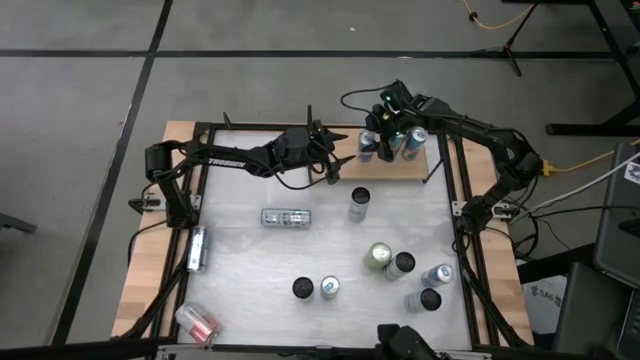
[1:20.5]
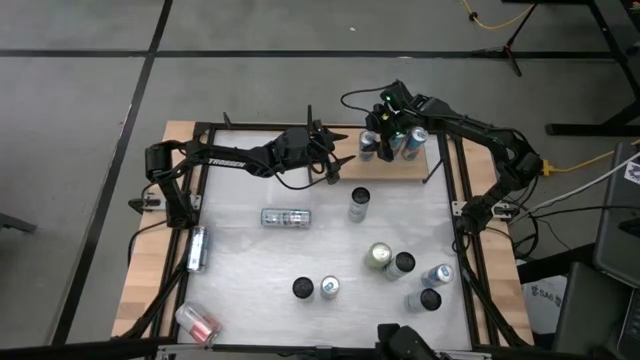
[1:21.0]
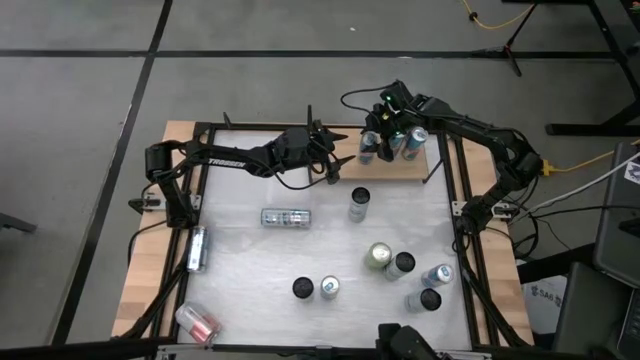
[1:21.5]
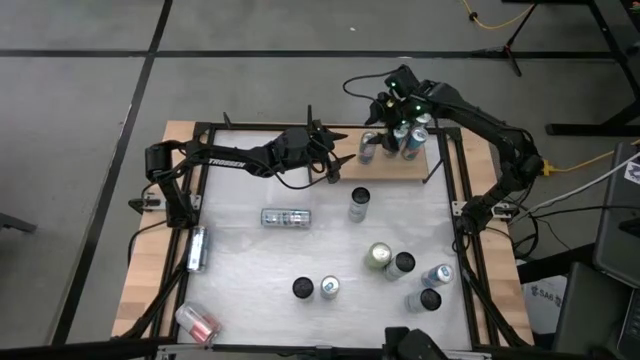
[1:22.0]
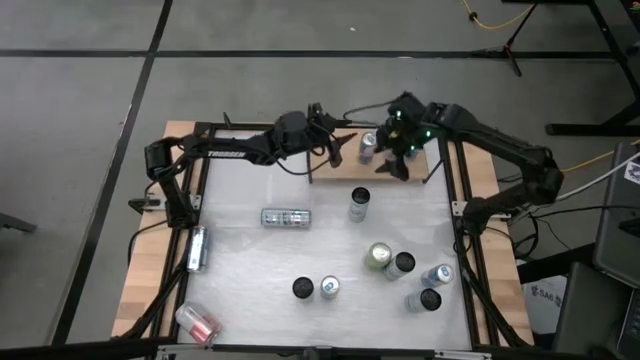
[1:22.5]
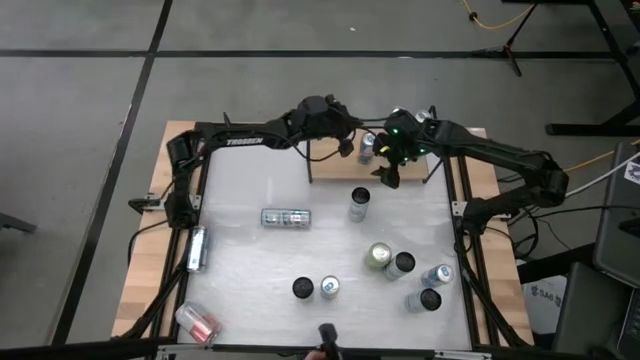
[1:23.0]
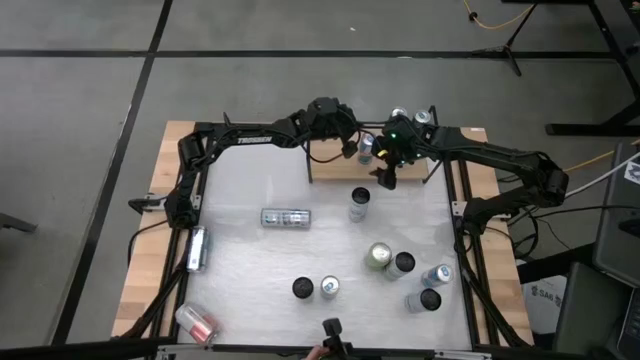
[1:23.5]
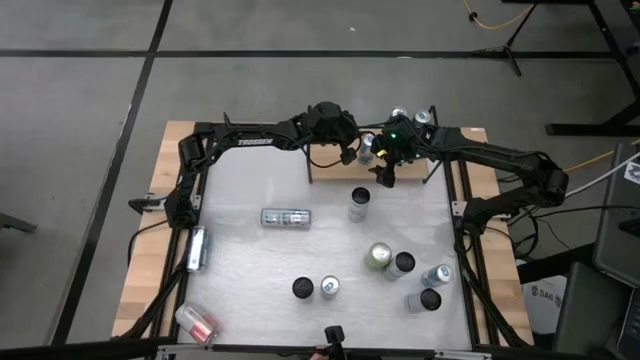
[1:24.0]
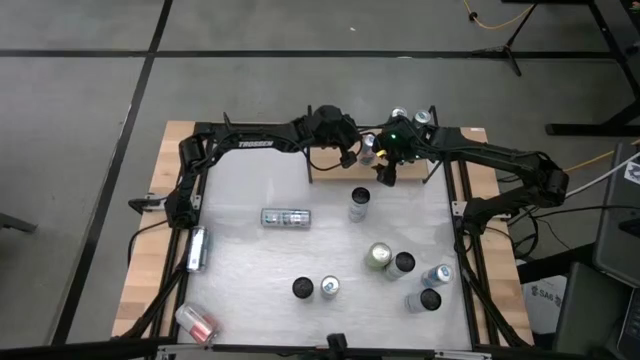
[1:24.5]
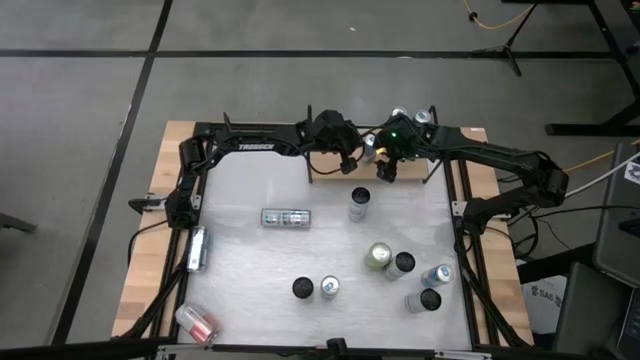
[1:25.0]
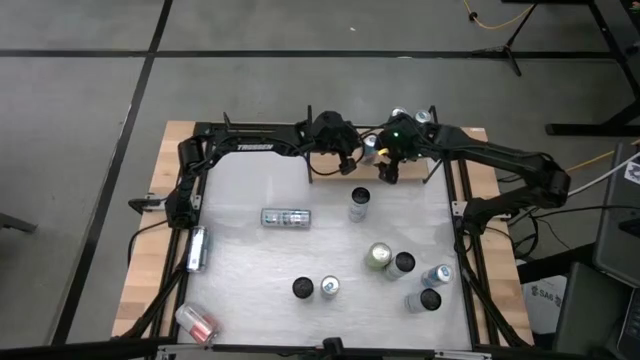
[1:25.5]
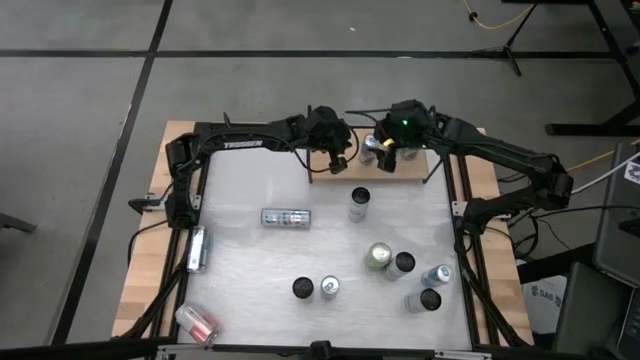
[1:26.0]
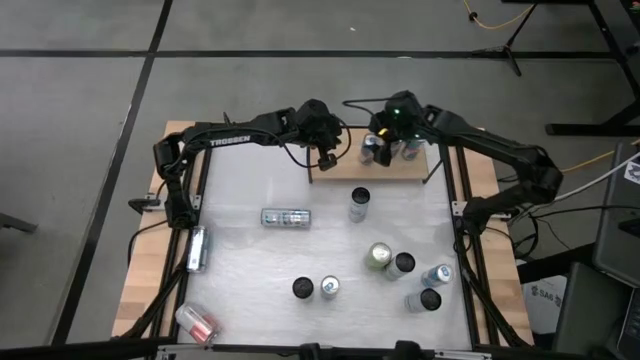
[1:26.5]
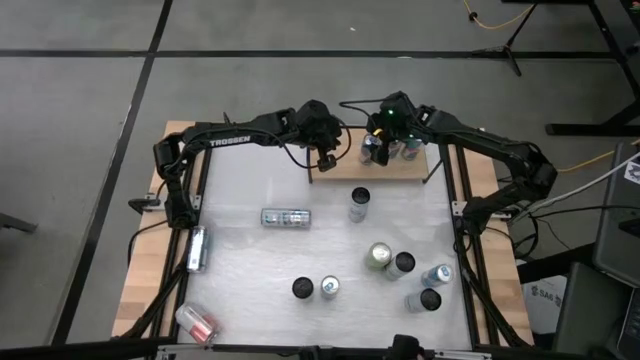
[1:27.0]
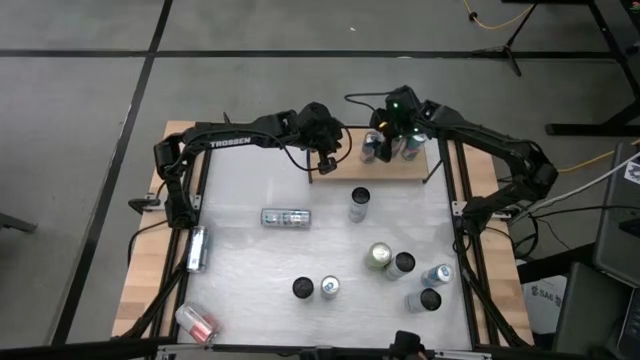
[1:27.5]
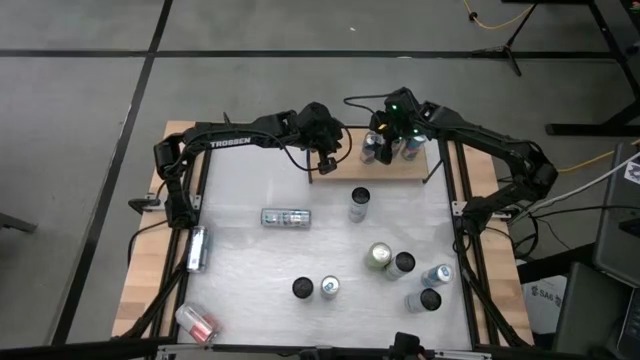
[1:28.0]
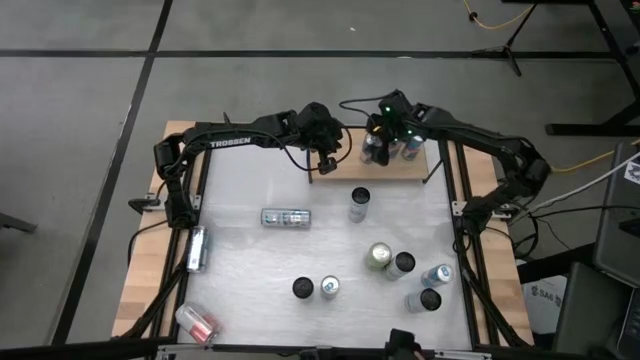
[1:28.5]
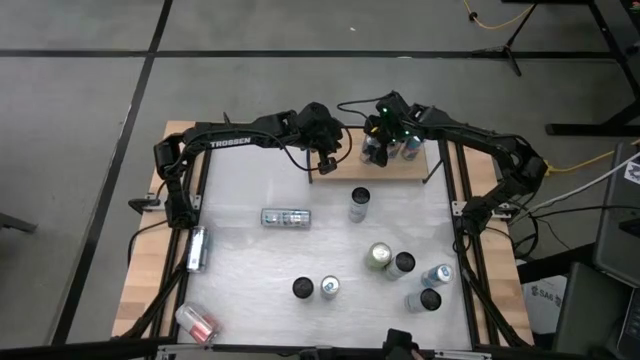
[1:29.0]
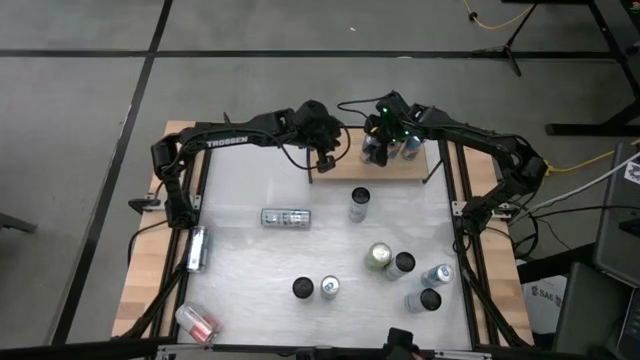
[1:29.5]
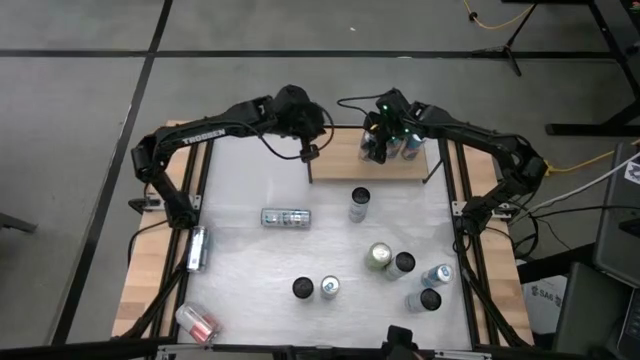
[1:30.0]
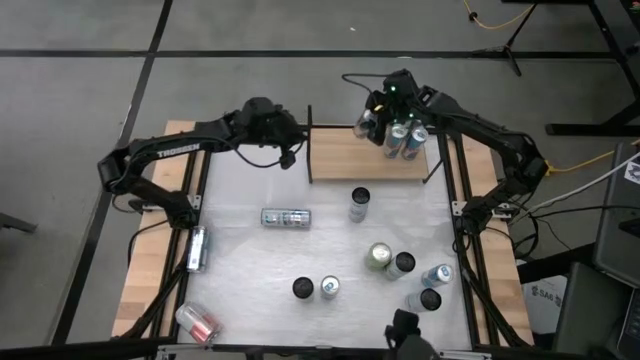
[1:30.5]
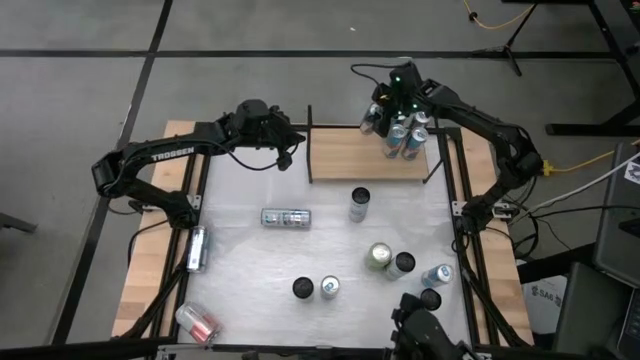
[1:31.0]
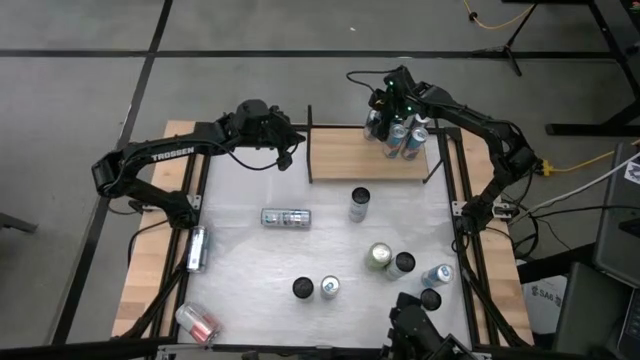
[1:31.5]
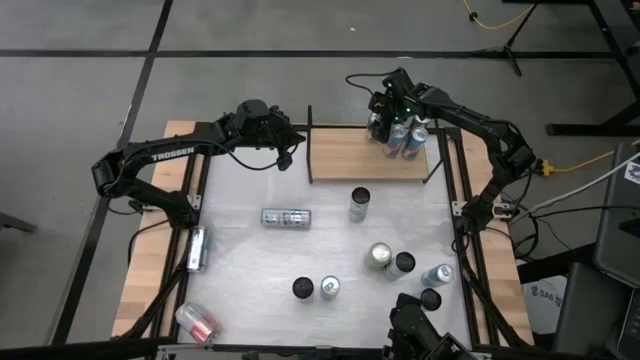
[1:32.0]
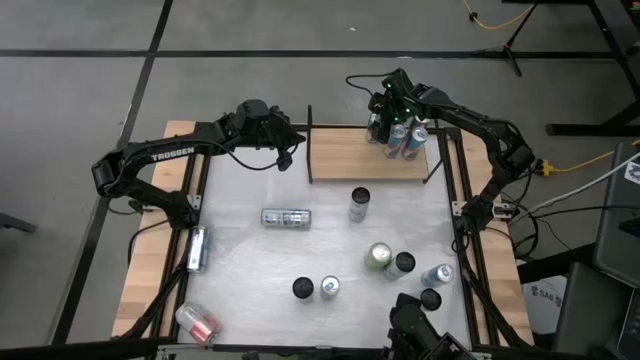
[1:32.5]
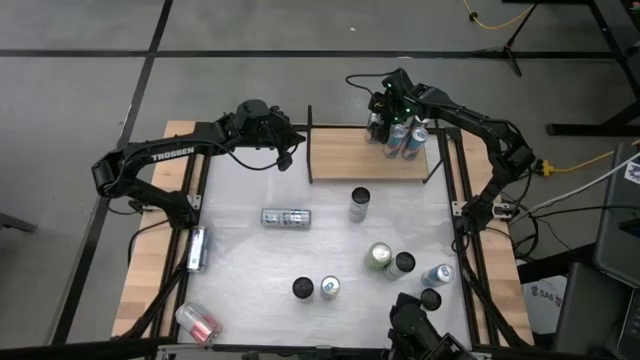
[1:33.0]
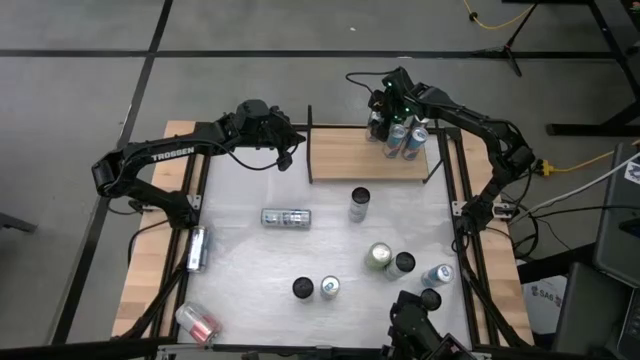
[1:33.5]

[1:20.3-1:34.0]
Task: Place canned beverage on shelf
Put the blue soda can on the shelf aligned with the other blue soda cans

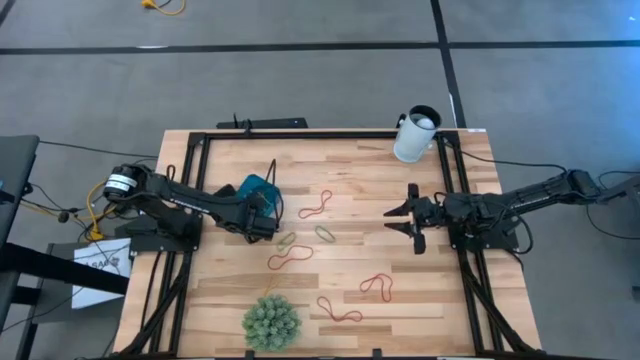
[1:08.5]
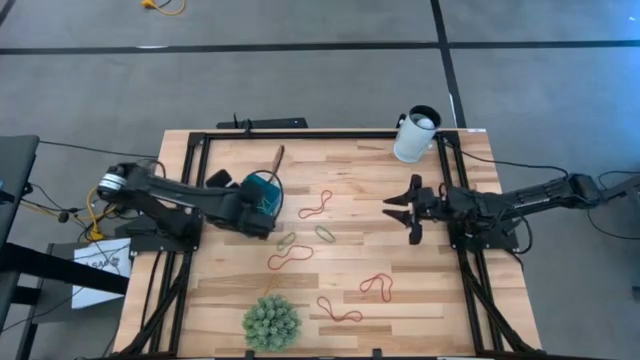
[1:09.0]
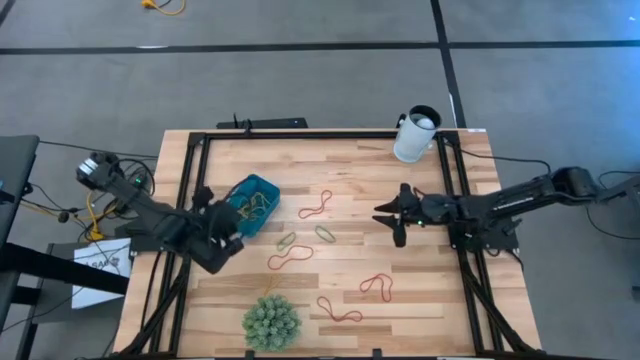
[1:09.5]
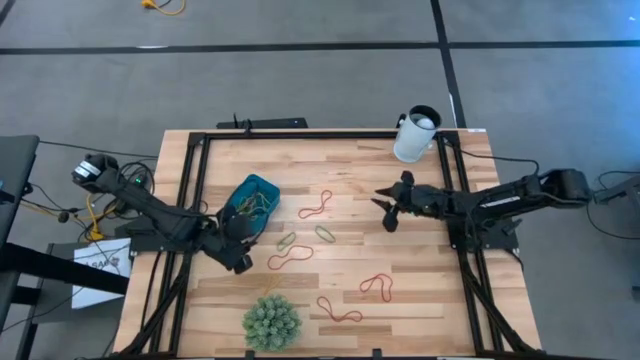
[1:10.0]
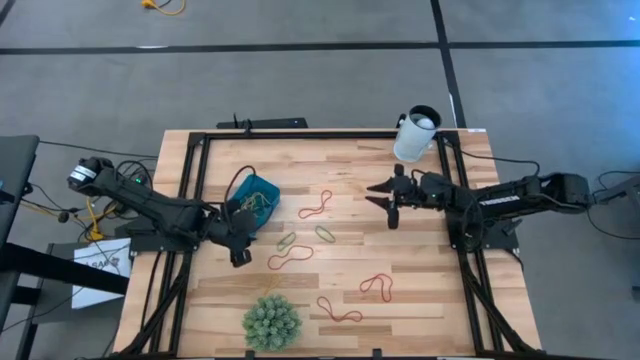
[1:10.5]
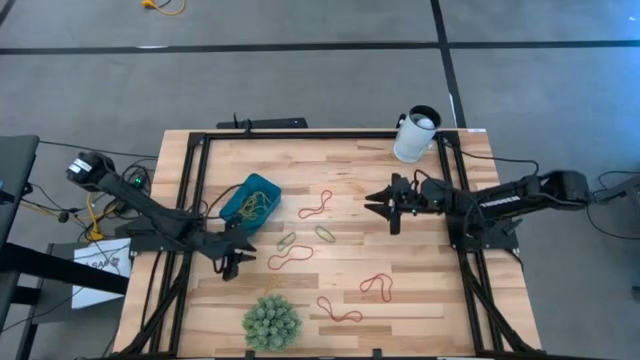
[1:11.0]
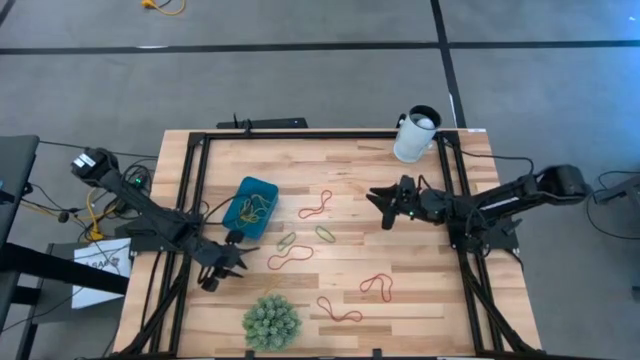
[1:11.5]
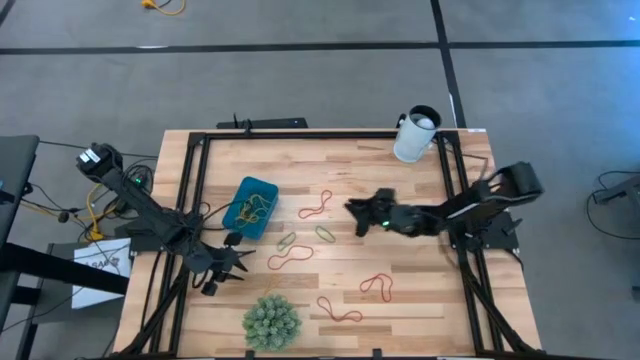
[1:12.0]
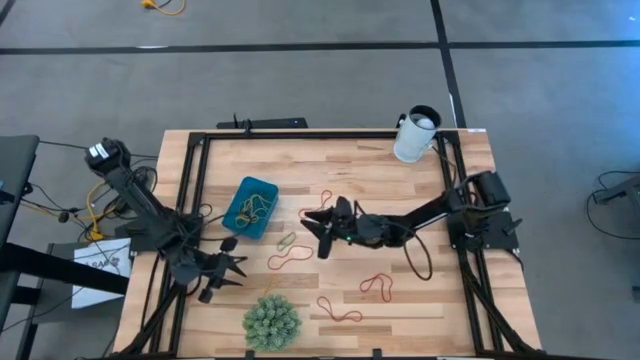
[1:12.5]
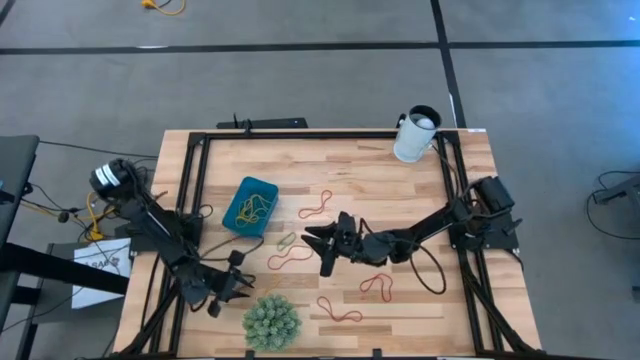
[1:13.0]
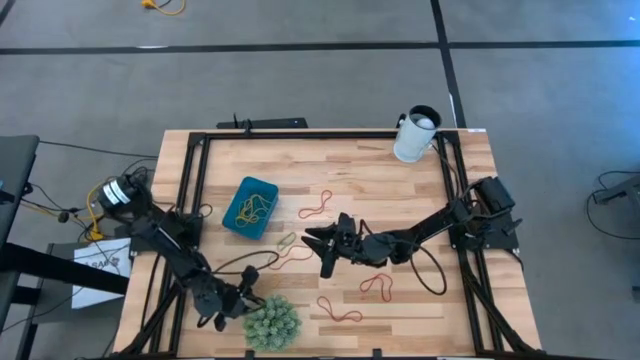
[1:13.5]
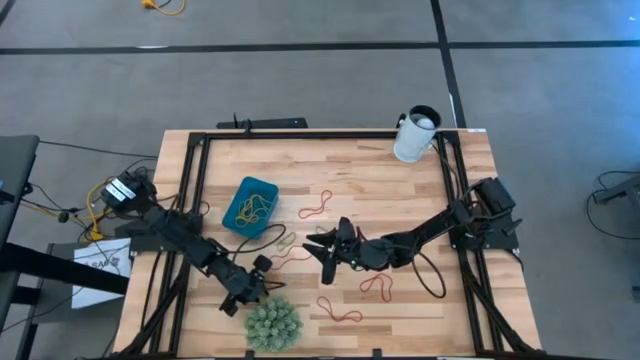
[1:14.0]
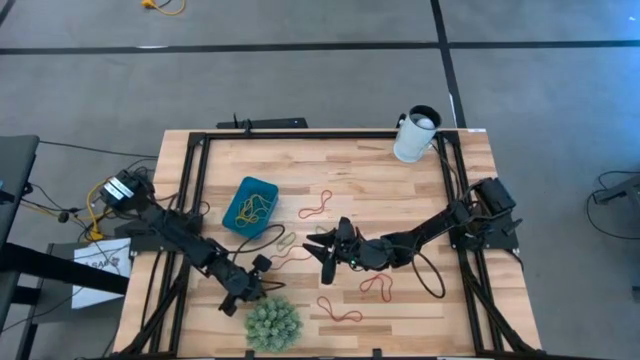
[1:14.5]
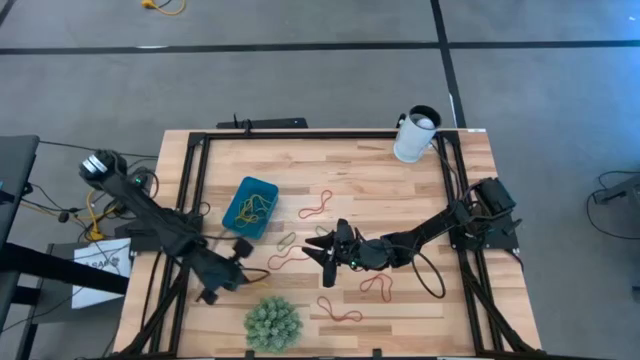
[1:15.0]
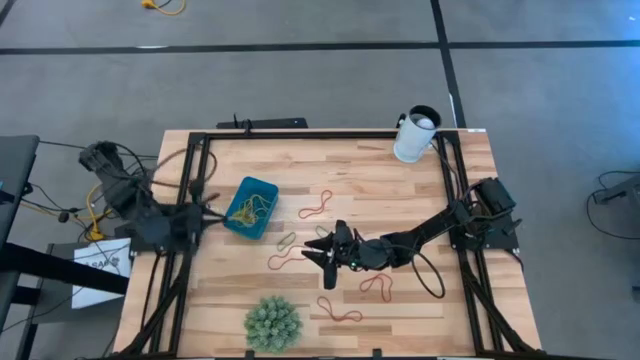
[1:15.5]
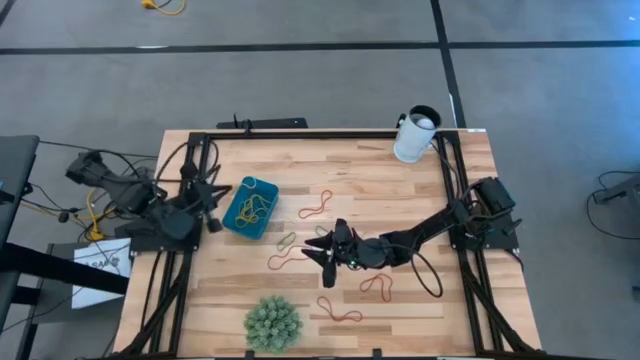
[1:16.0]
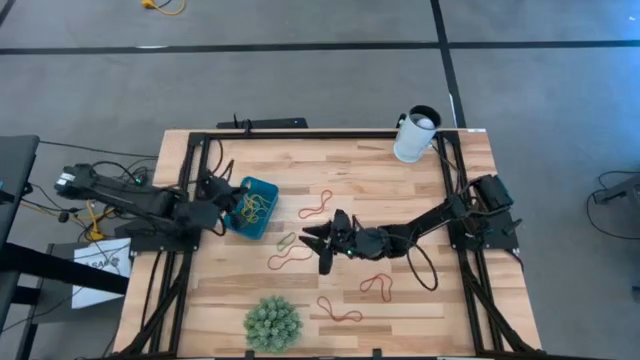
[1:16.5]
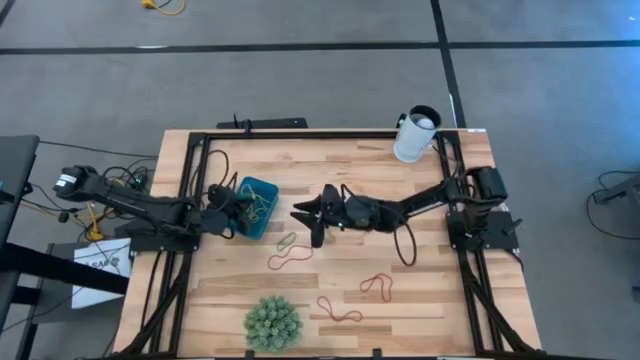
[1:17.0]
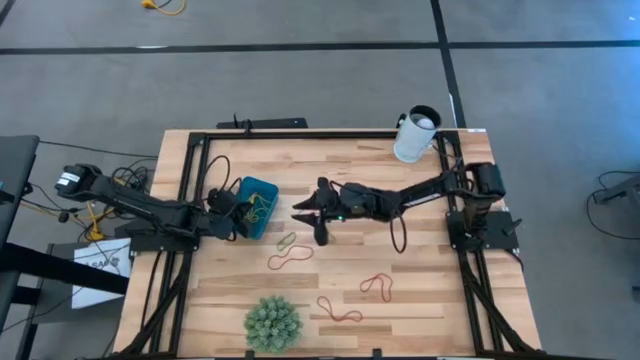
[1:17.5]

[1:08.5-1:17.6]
Task: Pick and place items into bin
Put the yellow rubber band into the blue bin
